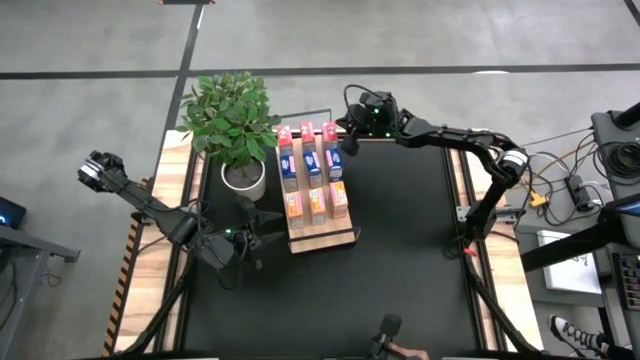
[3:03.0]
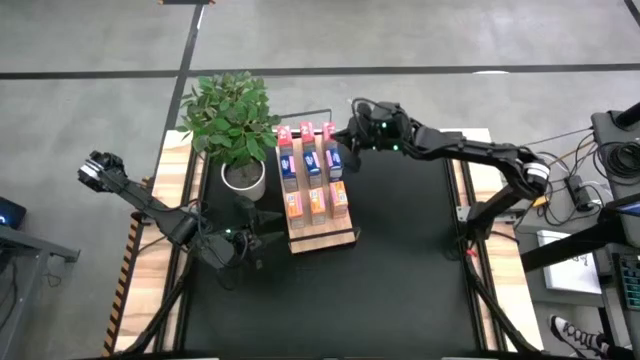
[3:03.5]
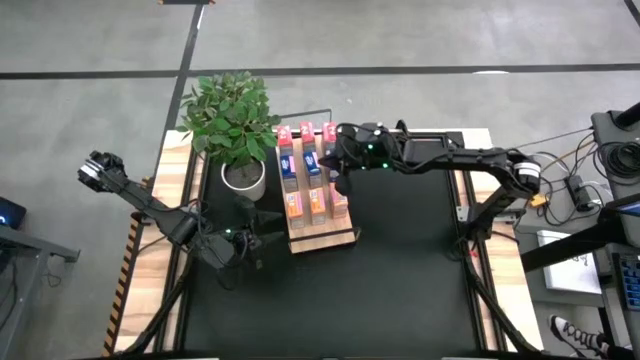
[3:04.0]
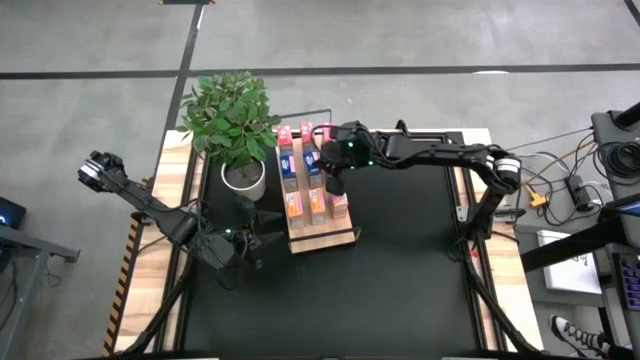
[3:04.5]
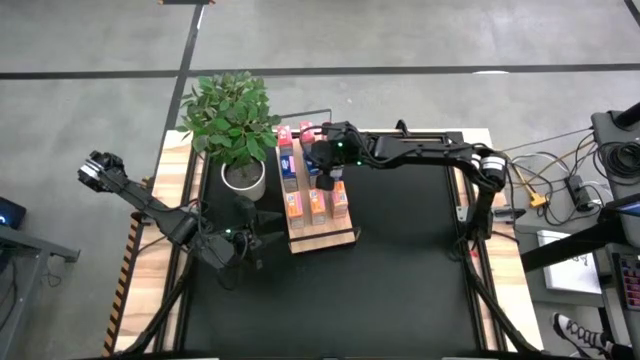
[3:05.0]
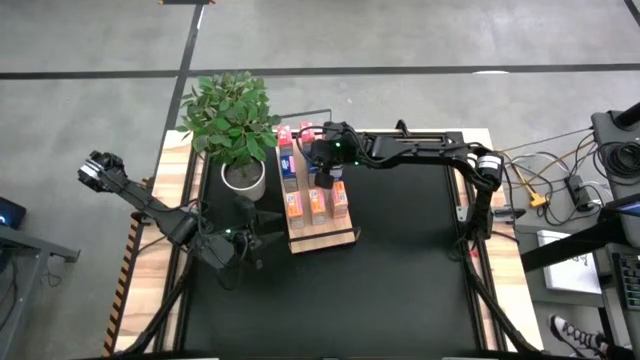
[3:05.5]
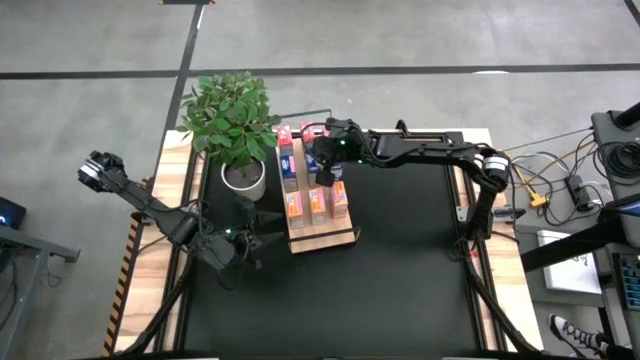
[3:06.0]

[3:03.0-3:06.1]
Task: Stack cereal on shelf
Adjust the blue cereal box on the shelf

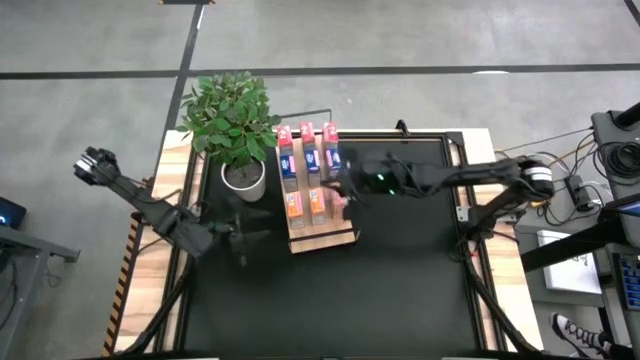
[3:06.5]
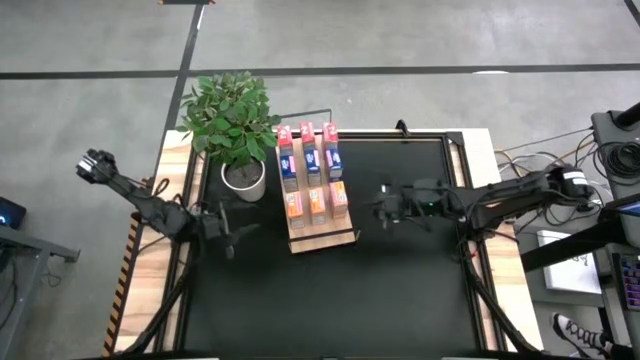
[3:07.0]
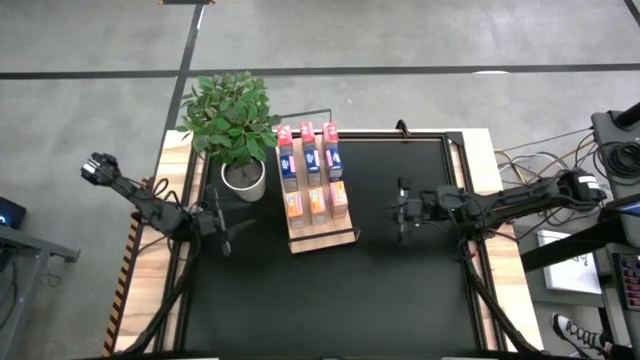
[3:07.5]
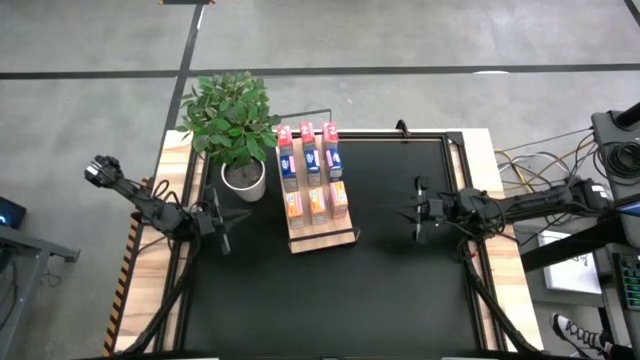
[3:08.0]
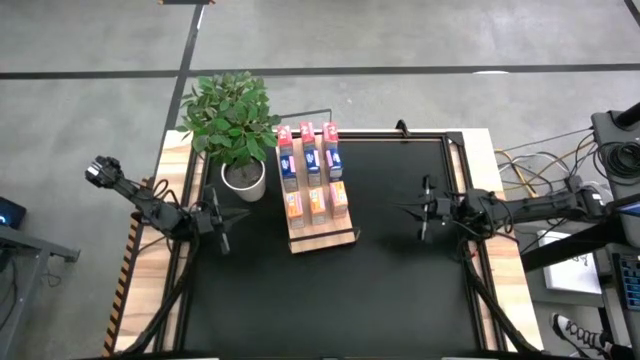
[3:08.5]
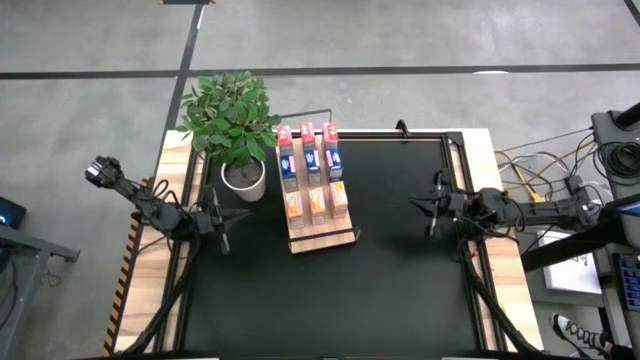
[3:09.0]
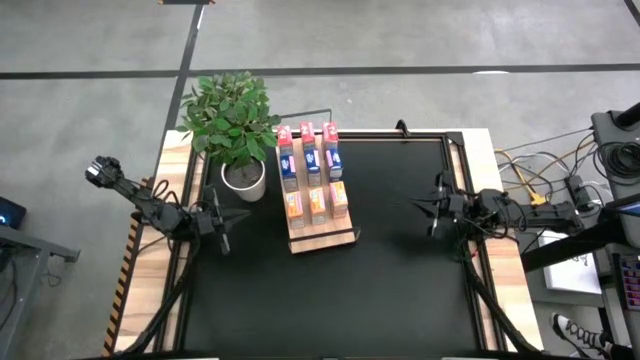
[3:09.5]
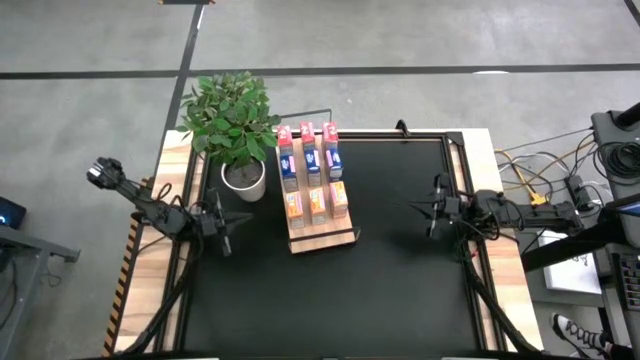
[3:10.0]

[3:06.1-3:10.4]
Return to Home Position

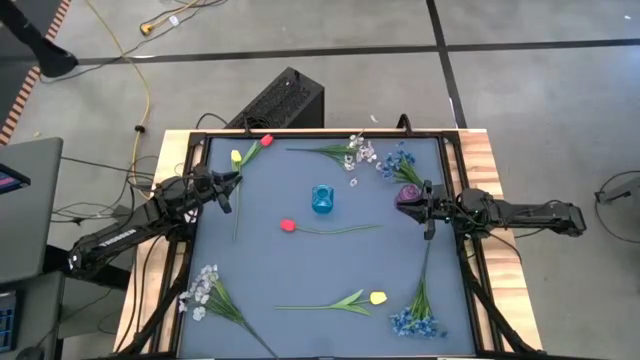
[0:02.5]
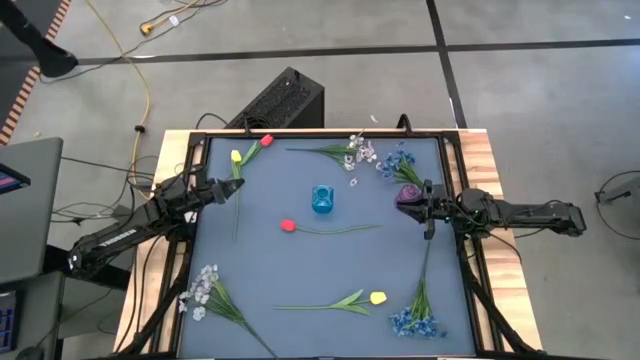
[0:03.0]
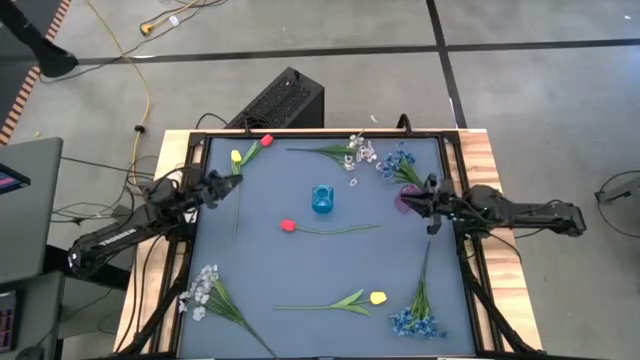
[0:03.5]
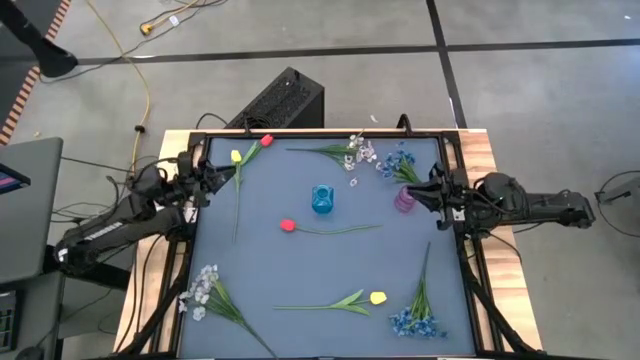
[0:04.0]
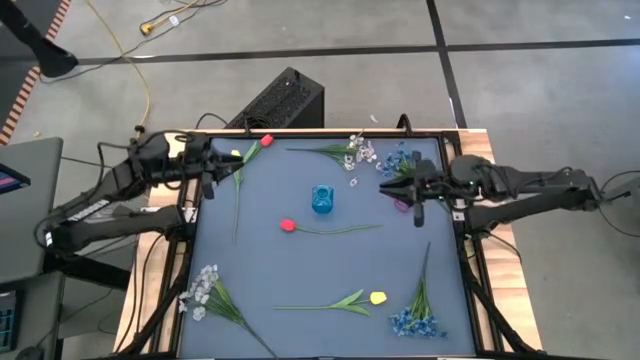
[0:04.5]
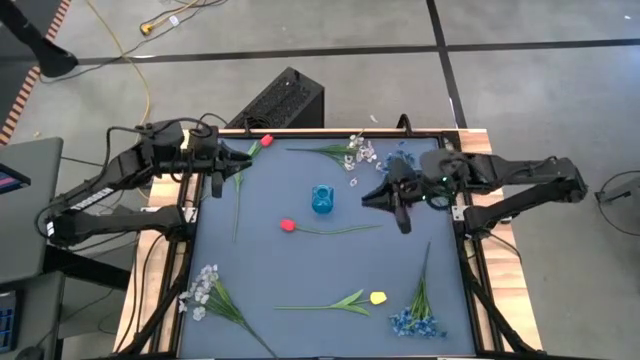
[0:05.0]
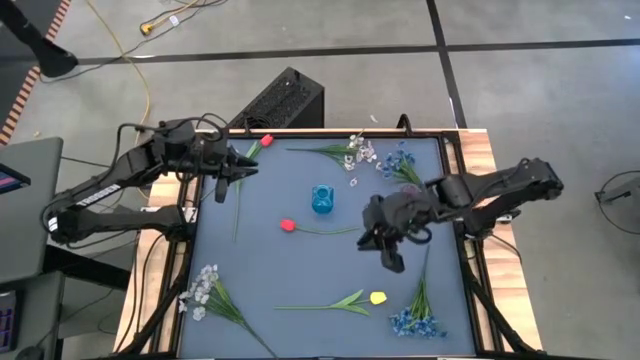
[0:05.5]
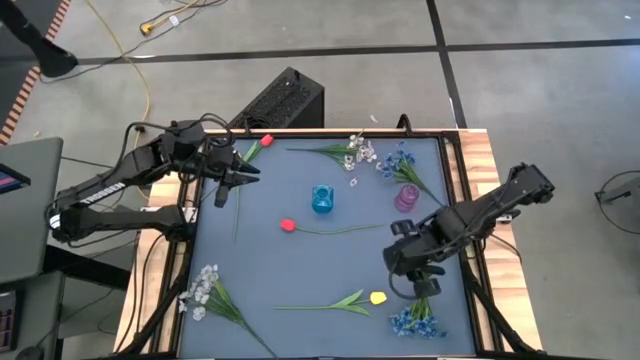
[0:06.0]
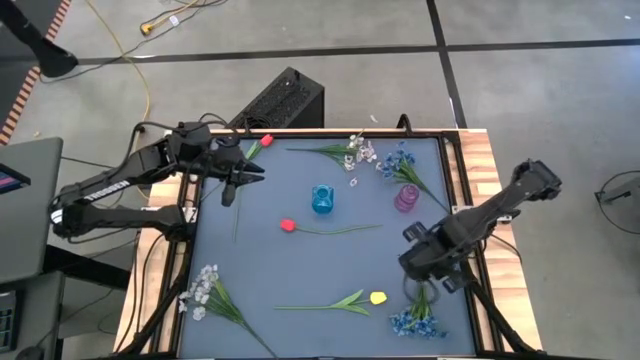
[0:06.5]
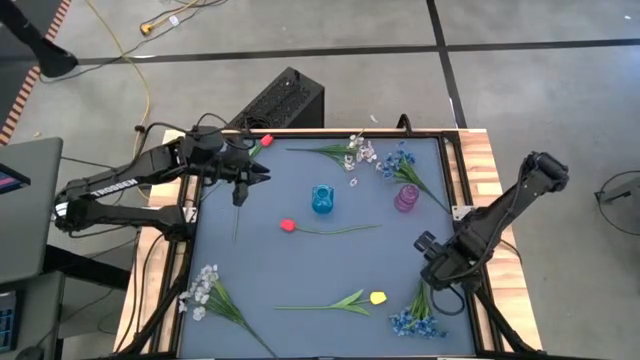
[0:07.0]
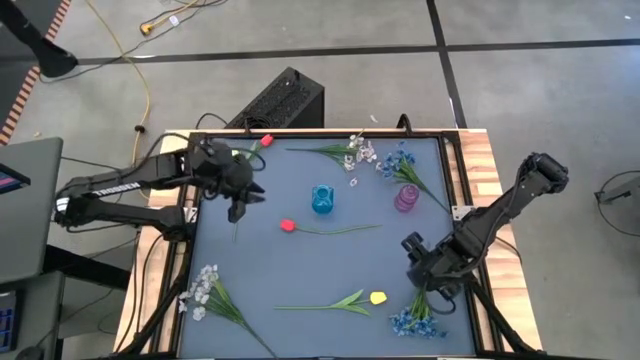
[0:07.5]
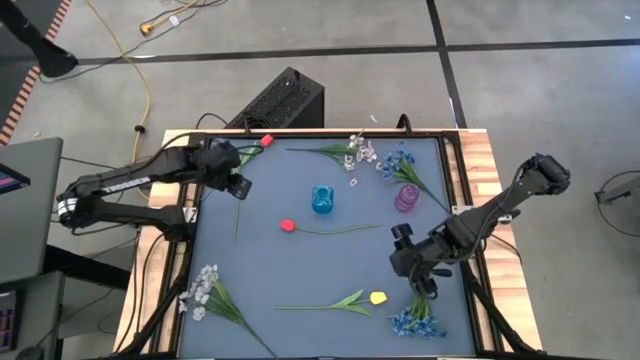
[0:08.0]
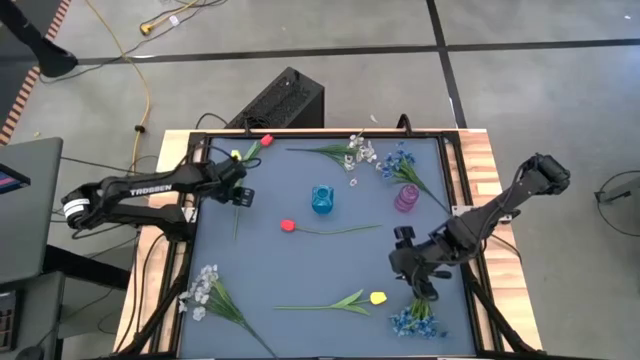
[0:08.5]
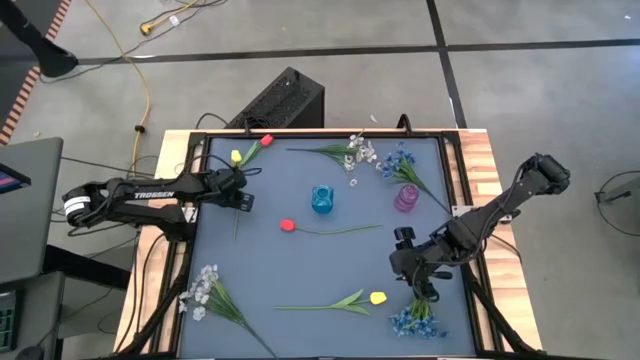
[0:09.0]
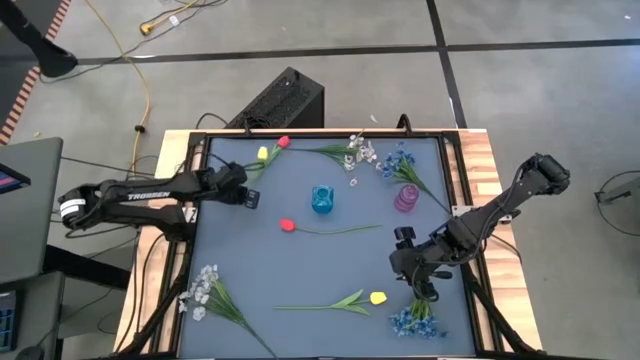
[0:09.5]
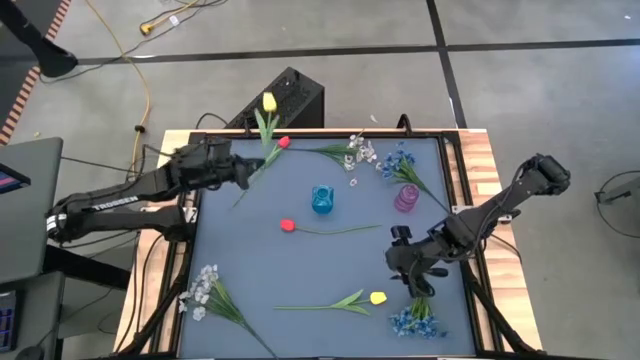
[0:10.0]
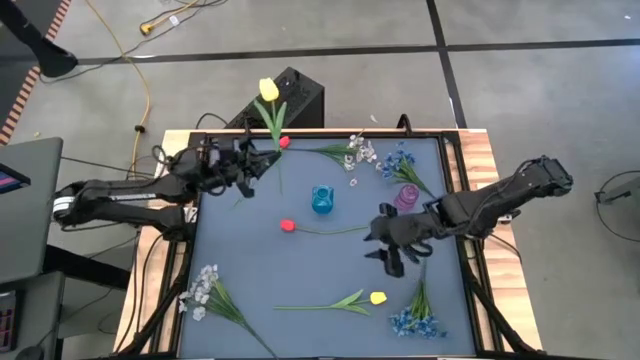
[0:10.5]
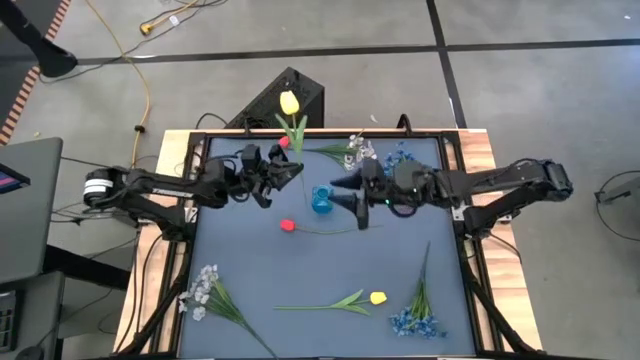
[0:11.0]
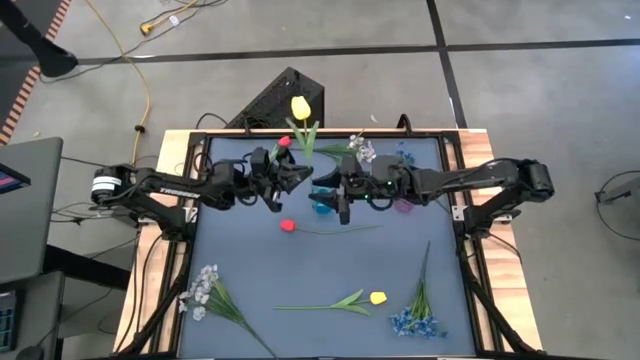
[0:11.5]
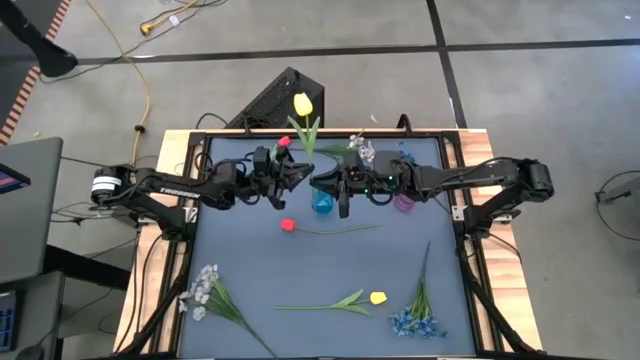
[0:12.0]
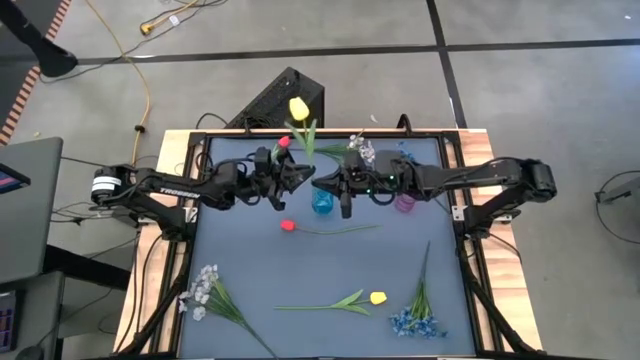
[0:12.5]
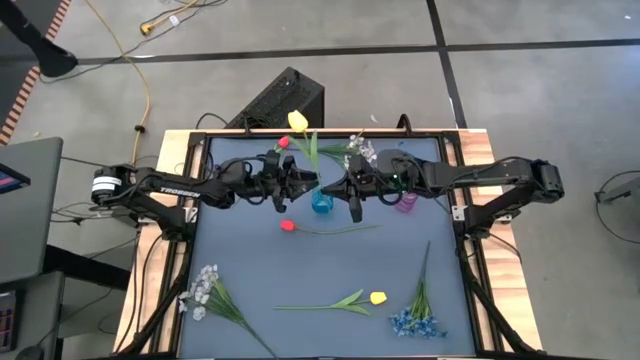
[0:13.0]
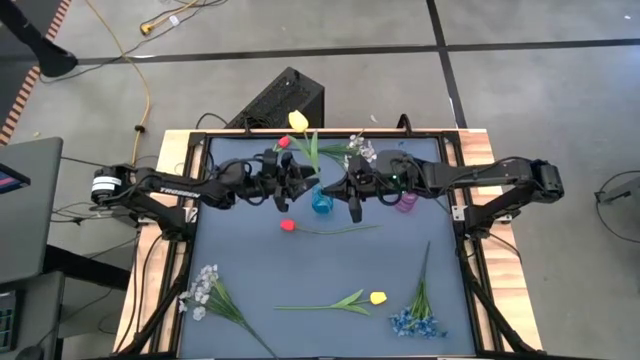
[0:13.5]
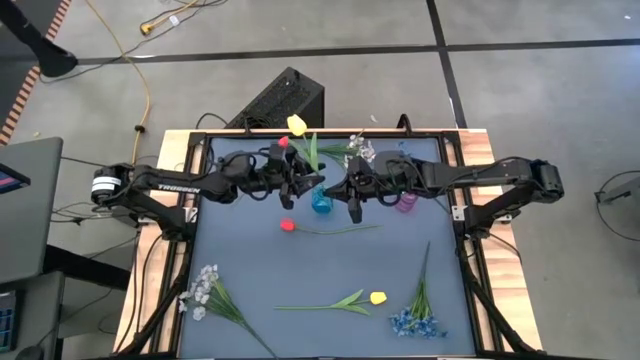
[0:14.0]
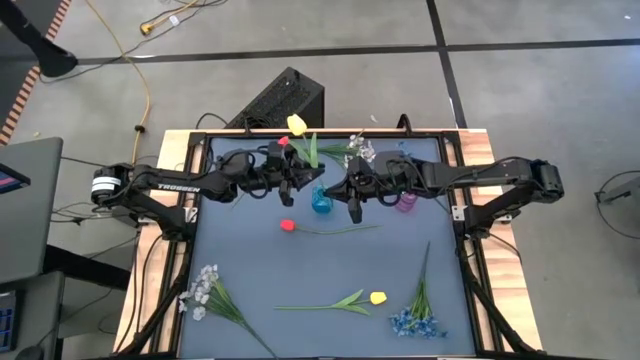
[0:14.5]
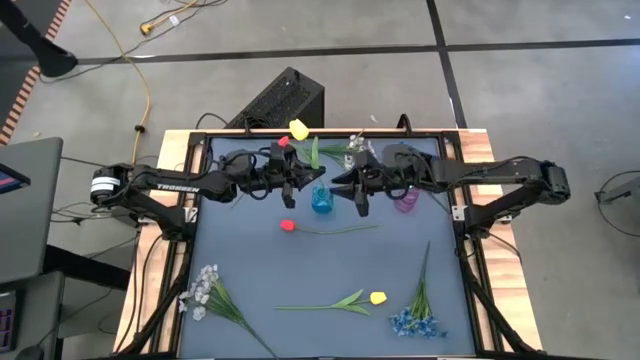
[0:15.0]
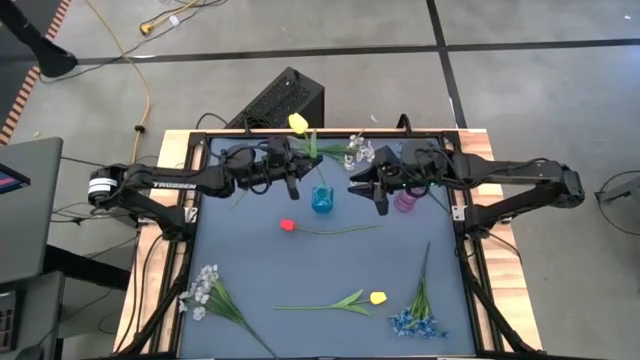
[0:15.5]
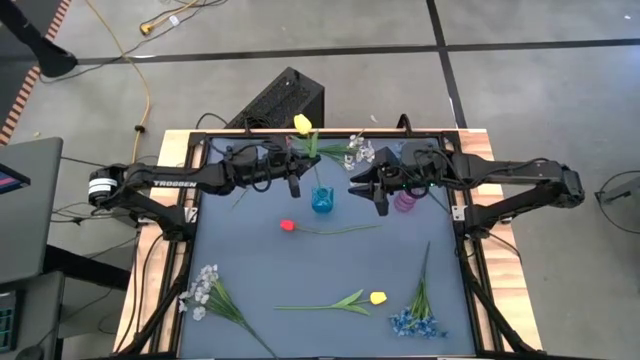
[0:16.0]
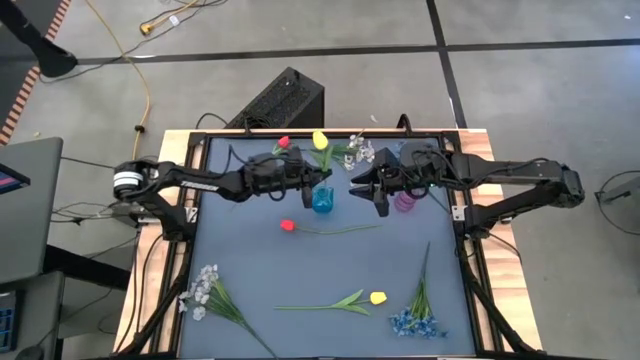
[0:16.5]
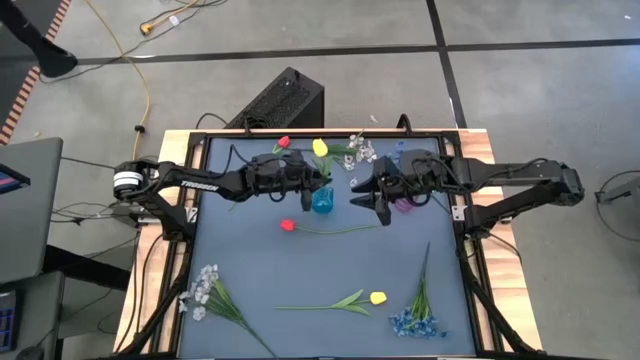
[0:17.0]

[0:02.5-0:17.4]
Task: Sort flowers into vase by color
Put the top yellow flower into the blue vase
